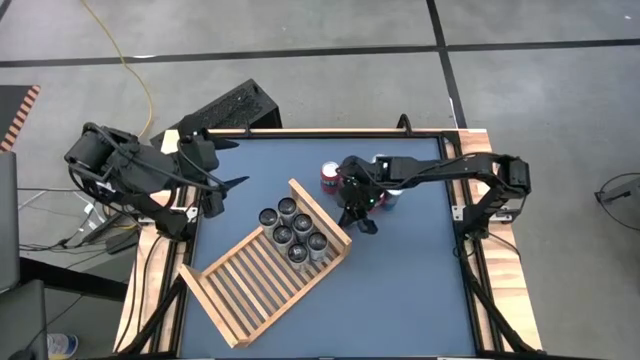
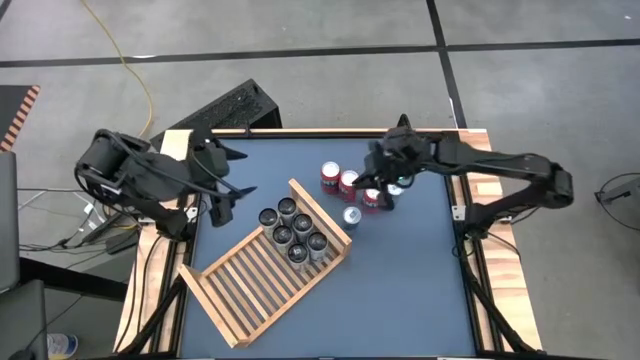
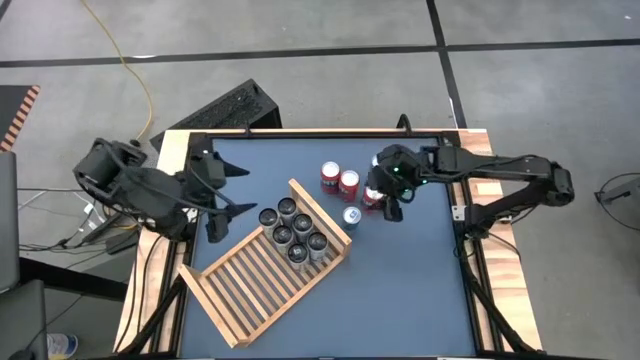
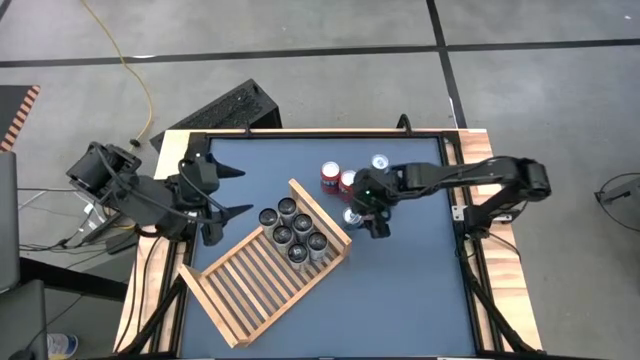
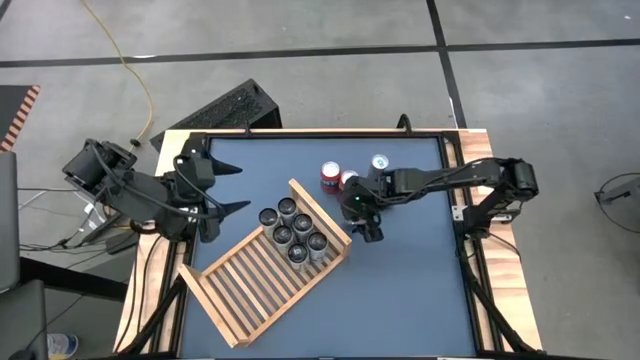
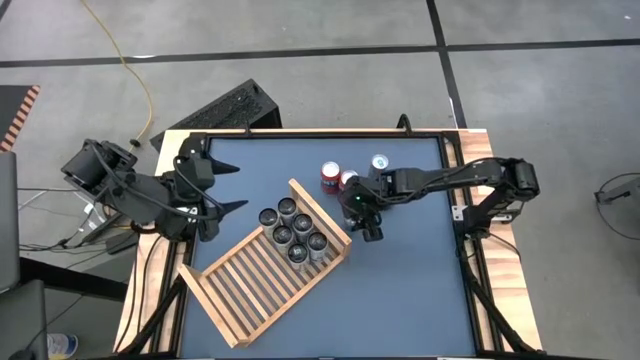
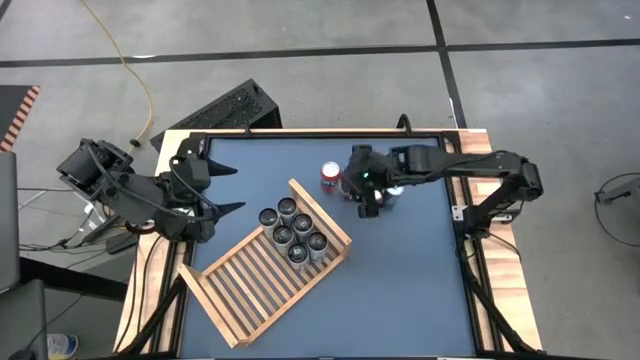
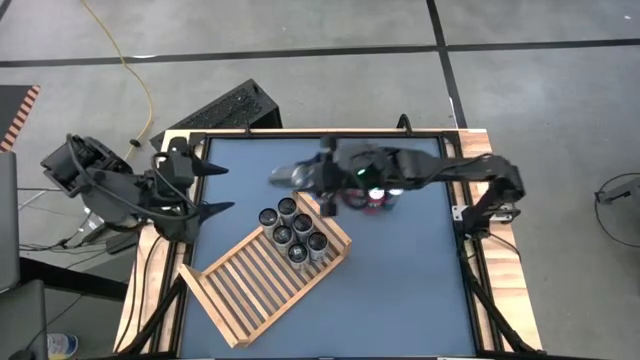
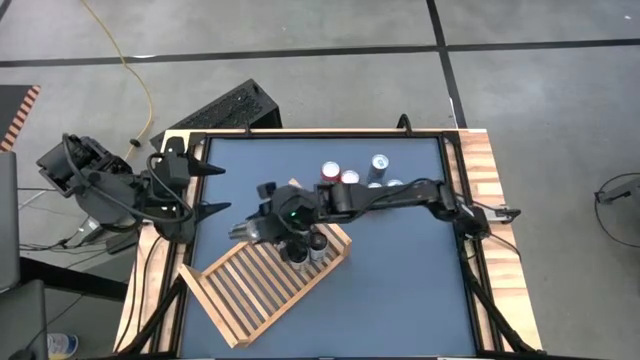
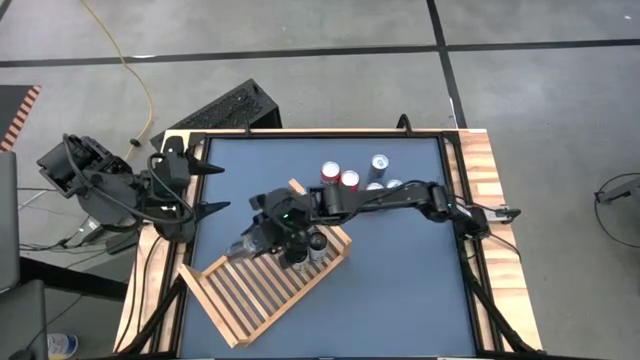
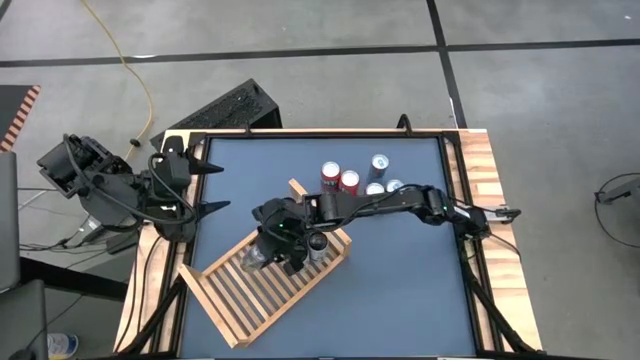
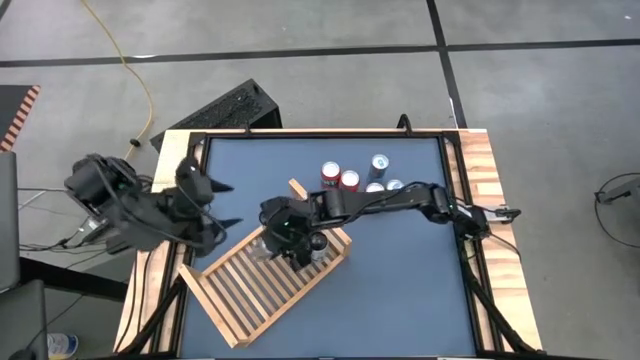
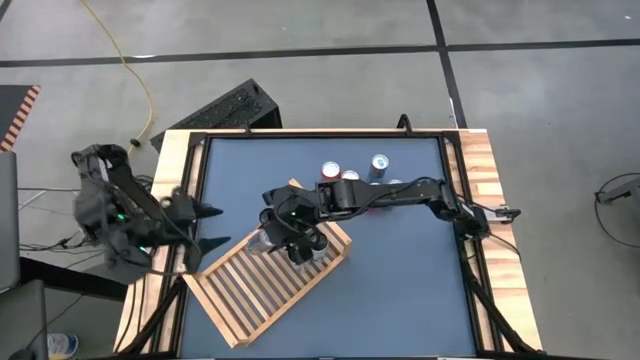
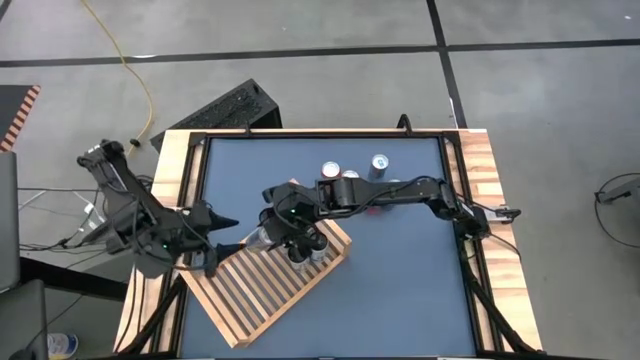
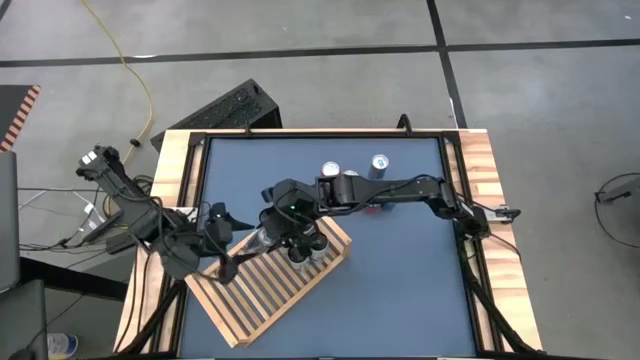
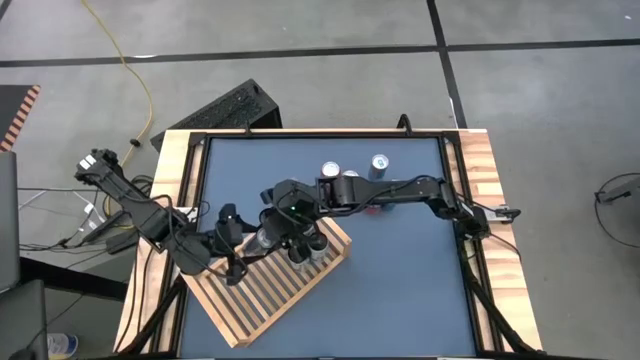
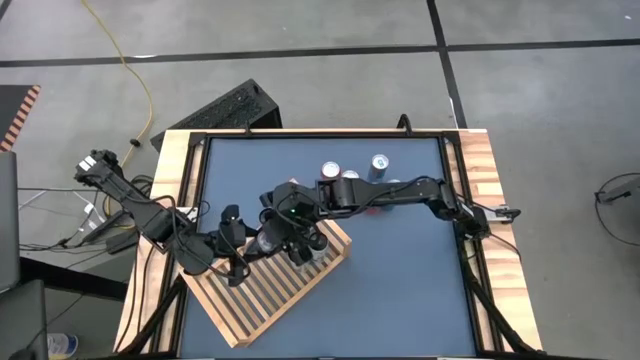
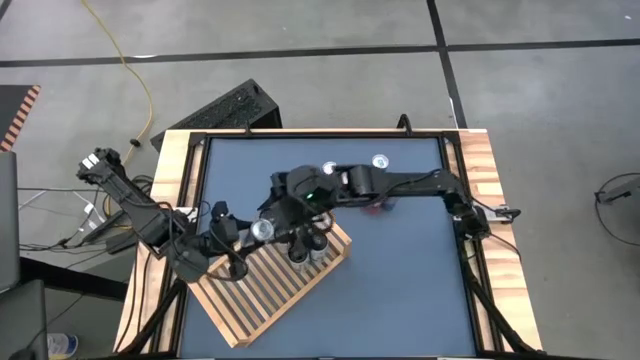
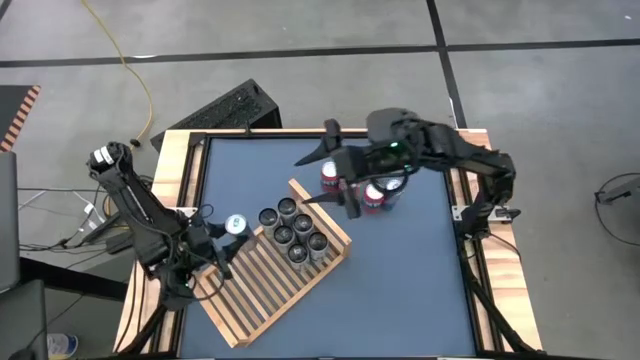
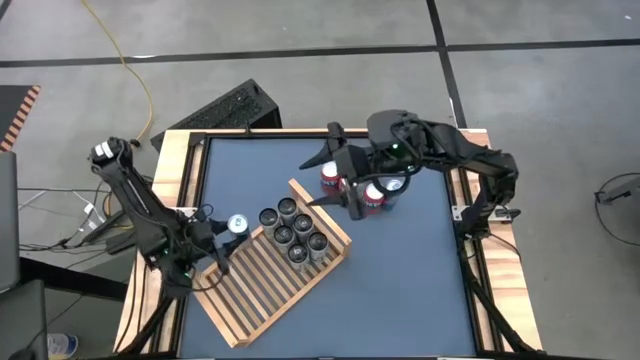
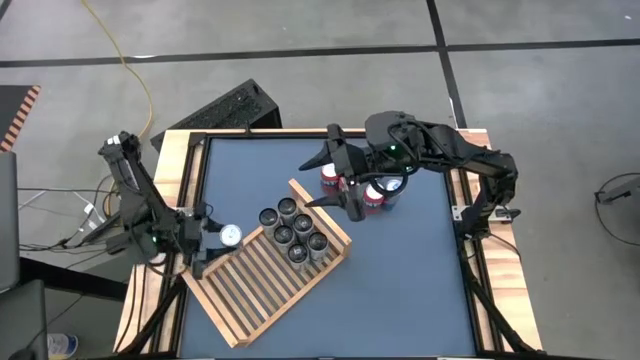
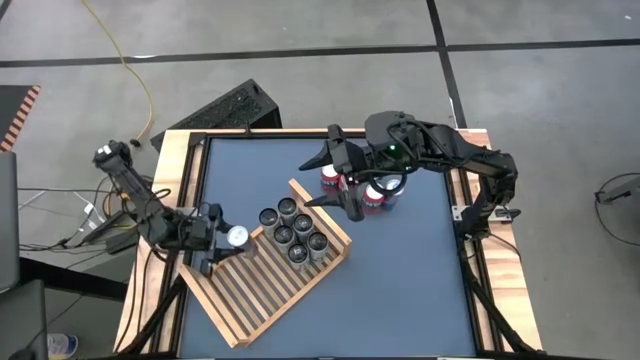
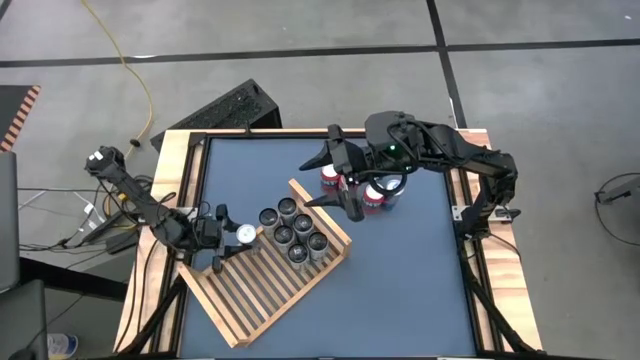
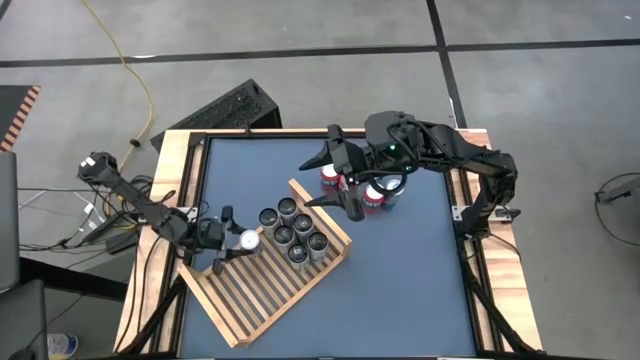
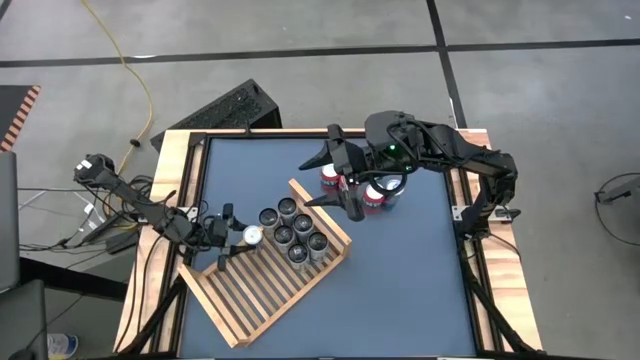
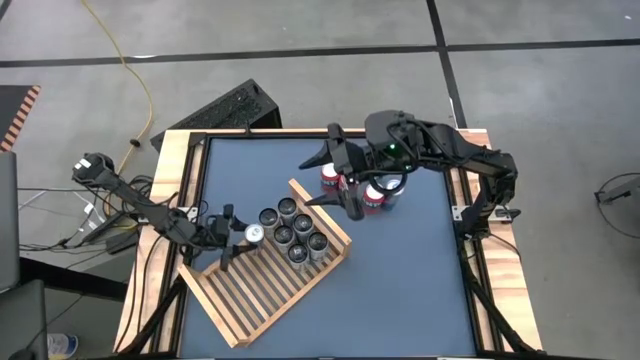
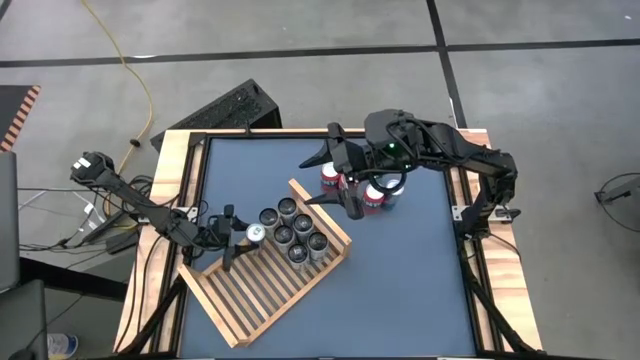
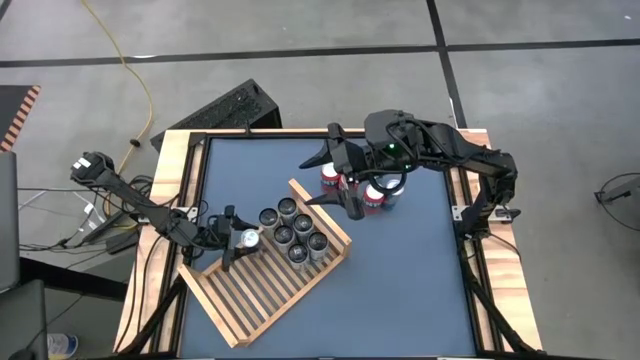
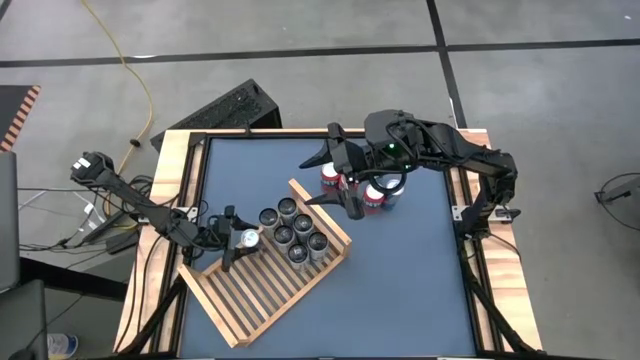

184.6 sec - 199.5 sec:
Task: Place canned beverage on shelf
Put the bottom blue soda can on the shelf

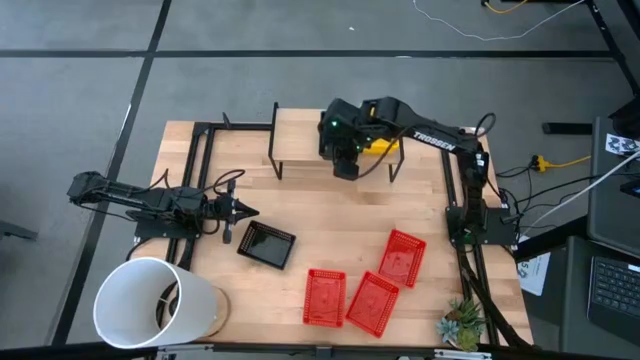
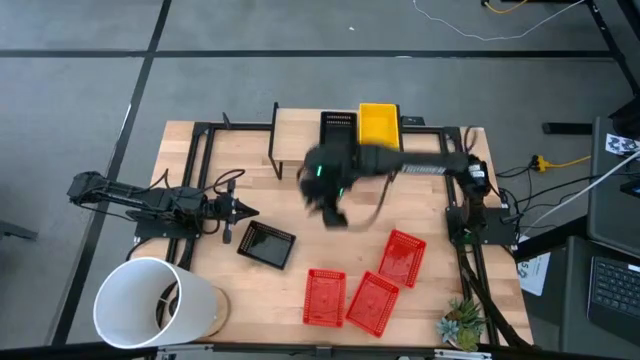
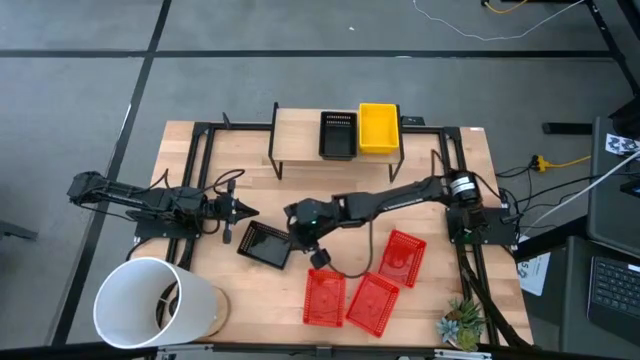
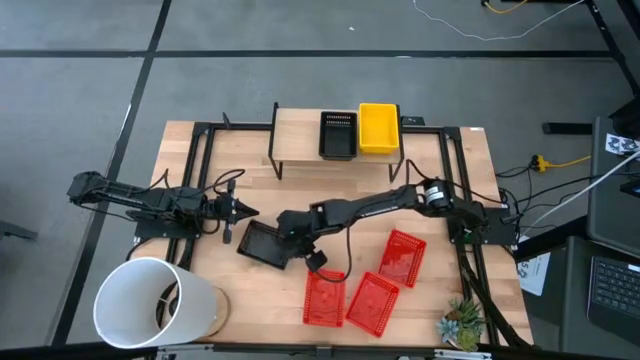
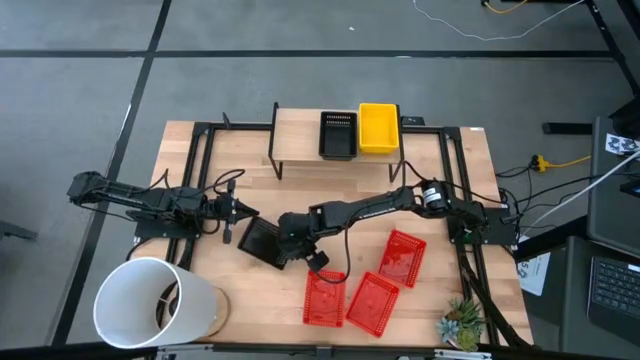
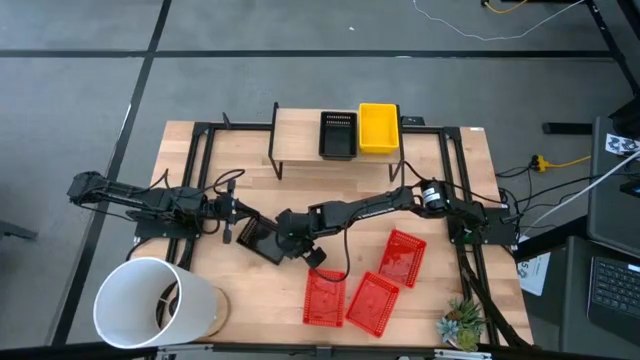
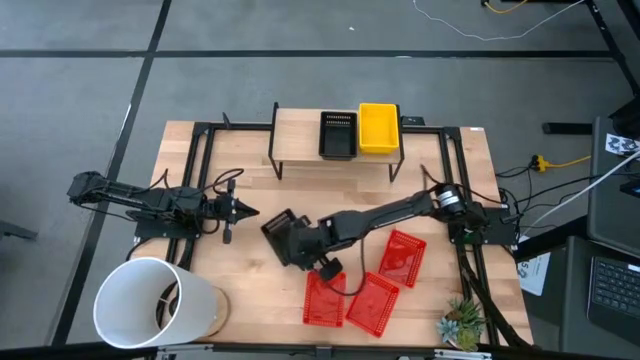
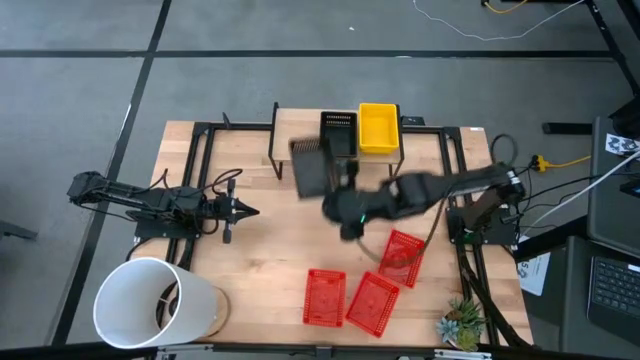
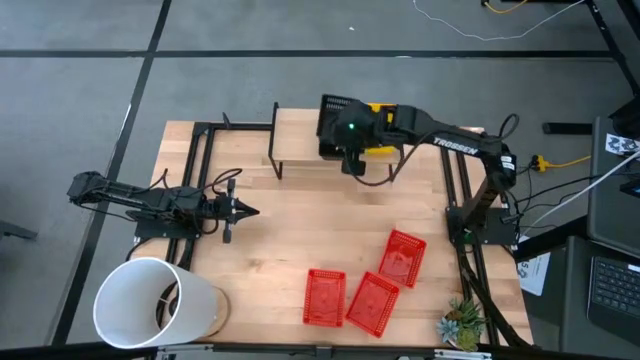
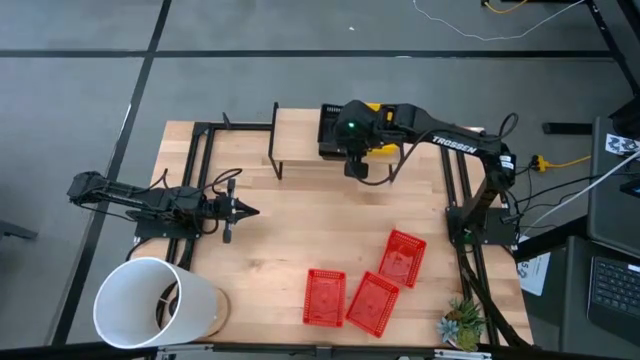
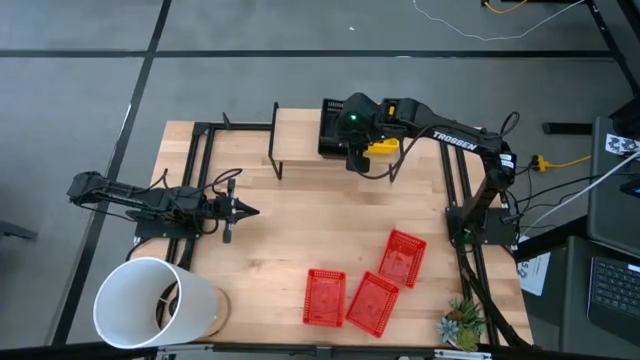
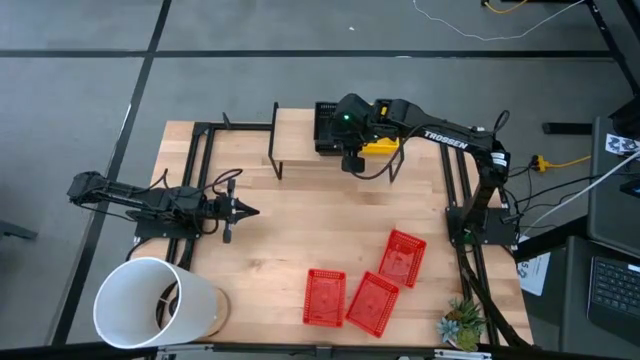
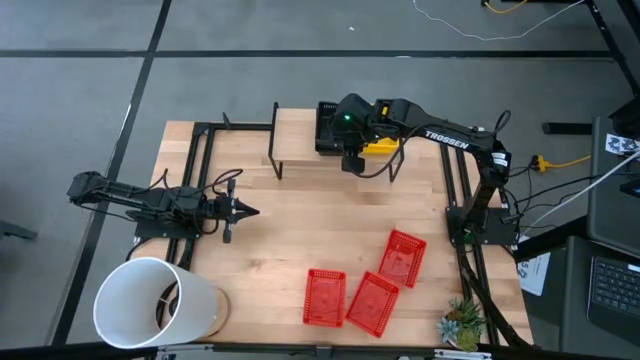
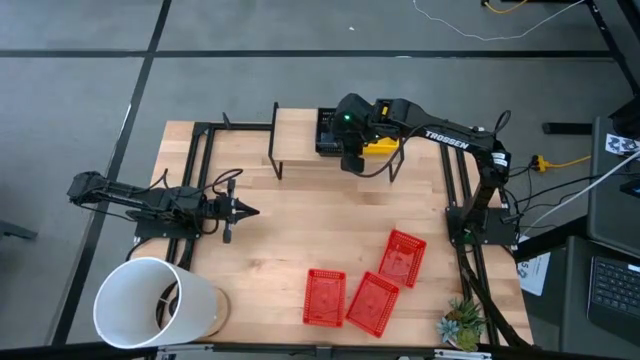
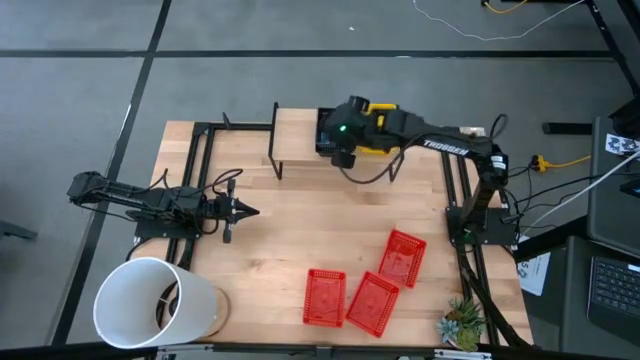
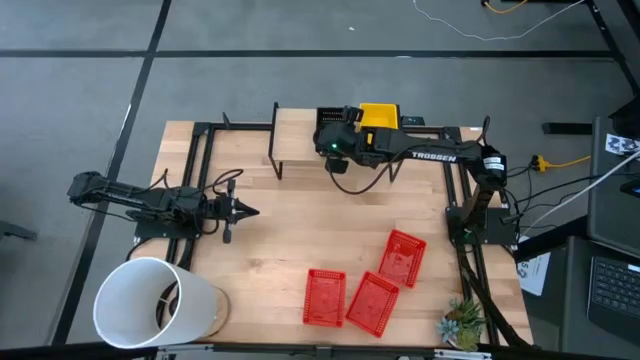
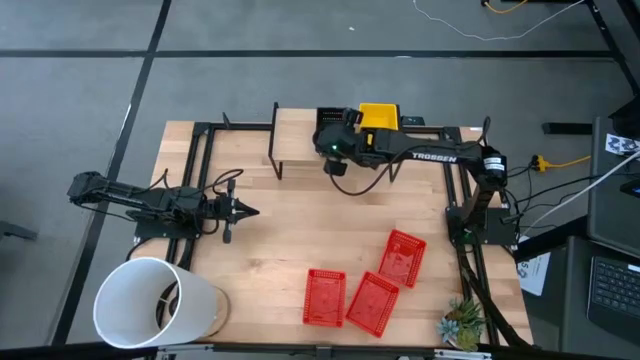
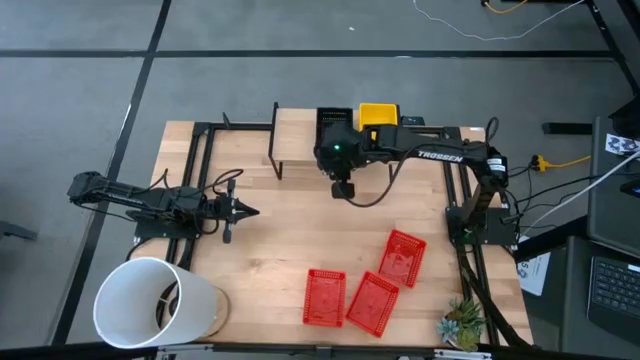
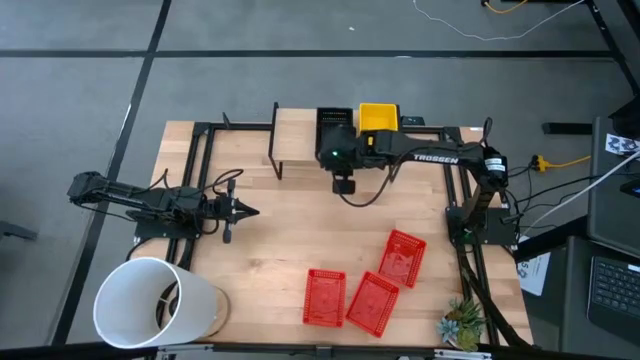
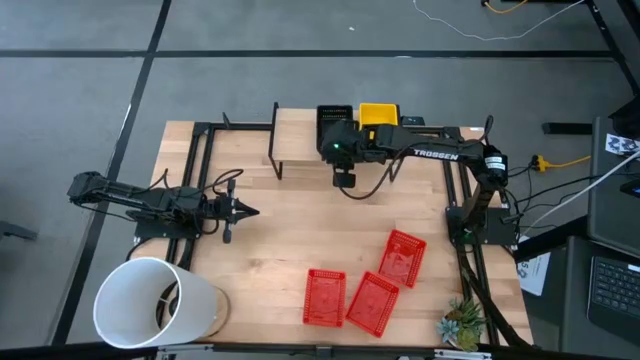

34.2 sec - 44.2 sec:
Task: Stack baskets on shelf by color
Stack the black basket on top of the black baskets on the shelf
